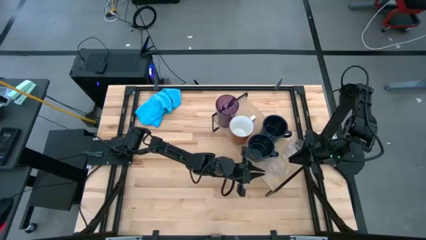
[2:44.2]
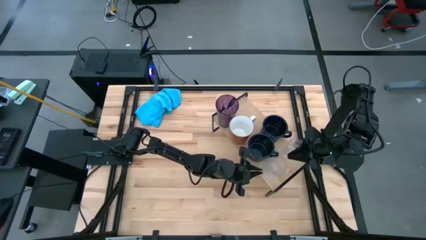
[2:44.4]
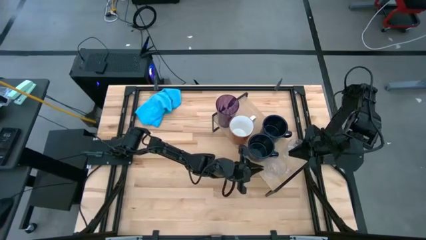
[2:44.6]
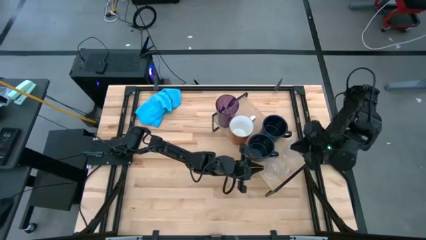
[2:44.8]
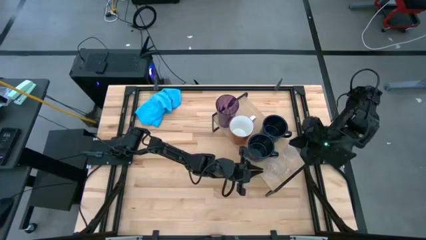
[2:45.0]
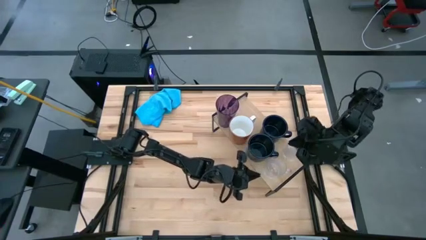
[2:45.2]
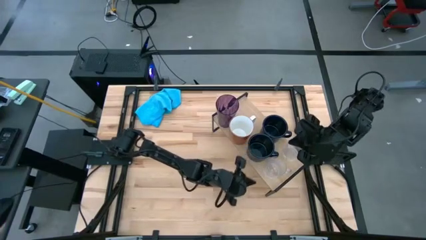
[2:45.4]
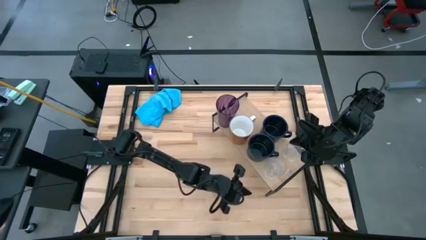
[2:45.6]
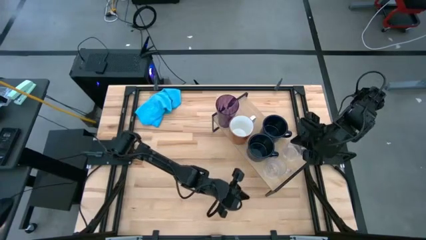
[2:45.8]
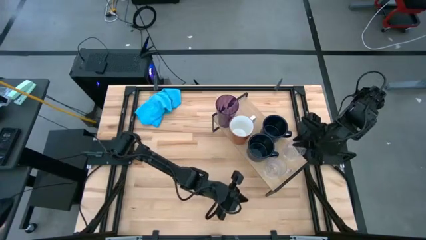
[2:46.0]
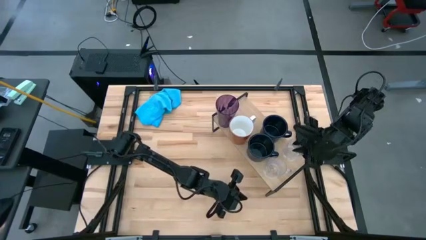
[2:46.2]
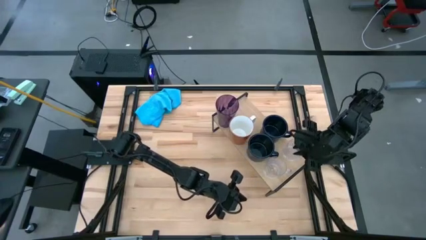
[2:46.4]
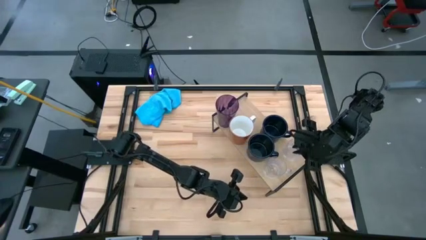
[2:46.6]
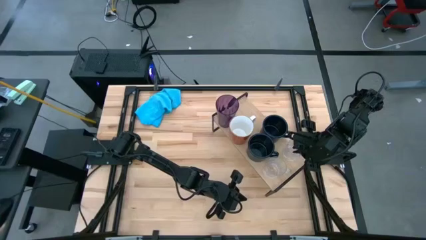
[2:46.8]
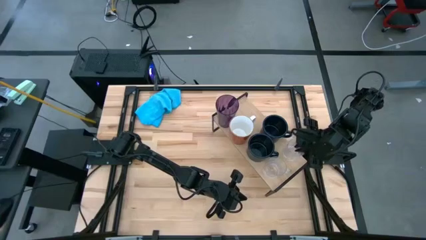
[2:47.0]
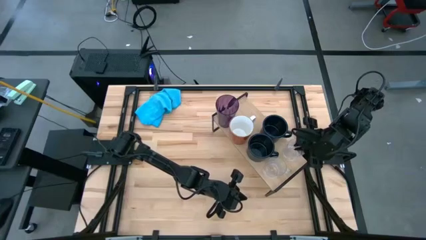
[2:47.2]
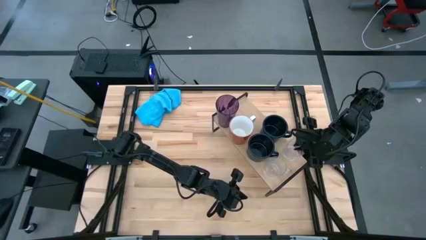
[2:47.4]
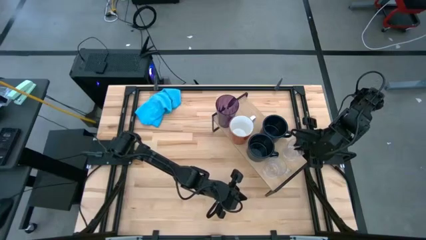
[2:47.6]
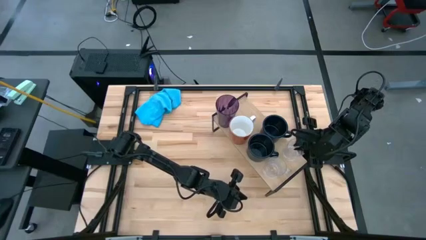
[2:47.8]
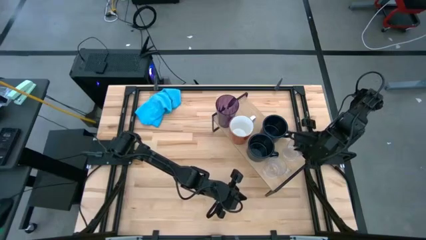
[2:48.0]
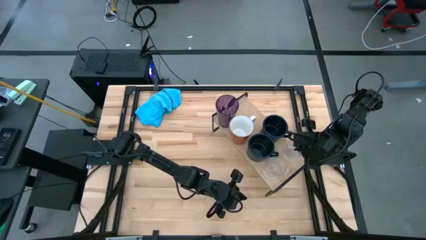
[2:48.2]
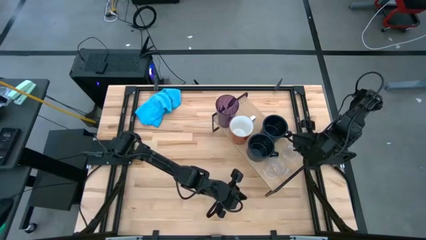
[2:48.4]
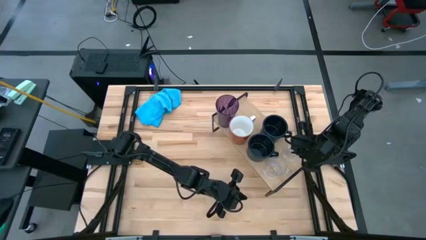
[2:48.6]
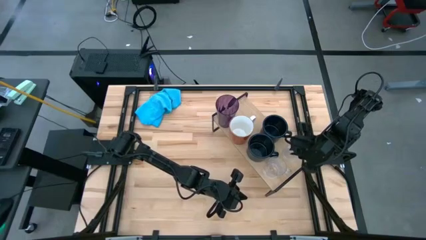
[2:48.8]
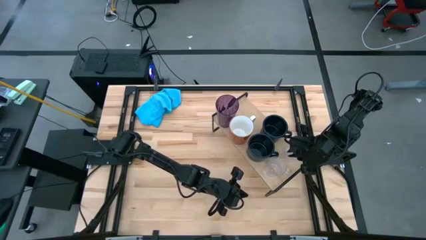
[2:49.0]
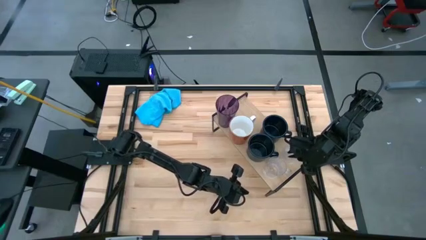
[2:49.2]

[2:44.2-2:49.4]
Task: Stack small to large cups/mugs on shelf
Adjust the transparent mug on the shelf

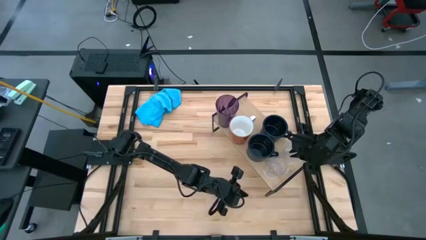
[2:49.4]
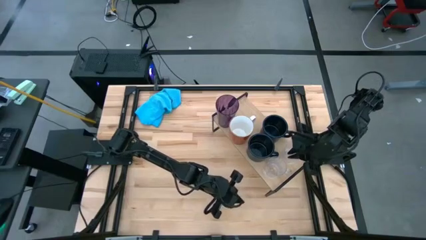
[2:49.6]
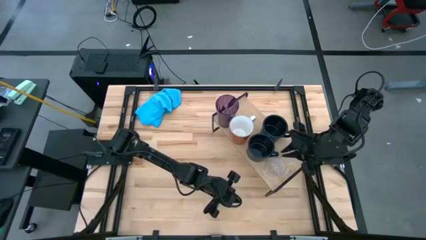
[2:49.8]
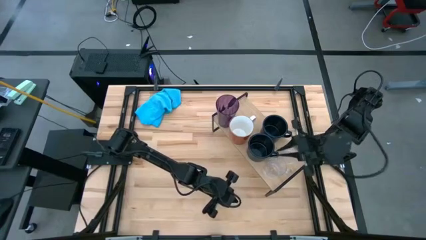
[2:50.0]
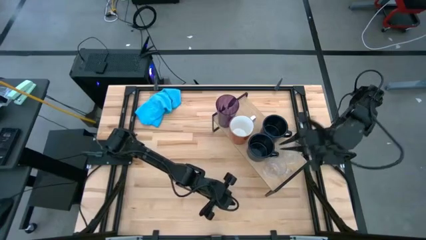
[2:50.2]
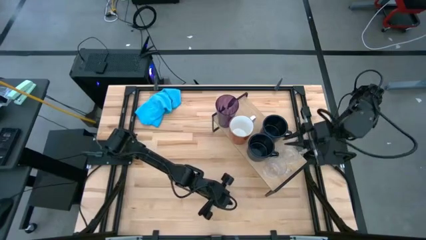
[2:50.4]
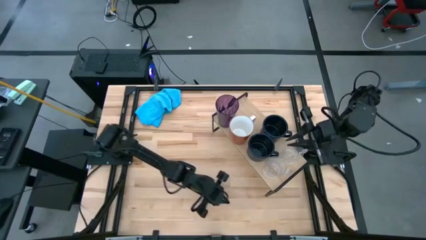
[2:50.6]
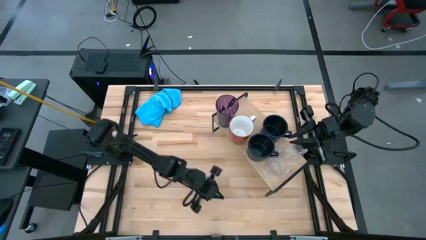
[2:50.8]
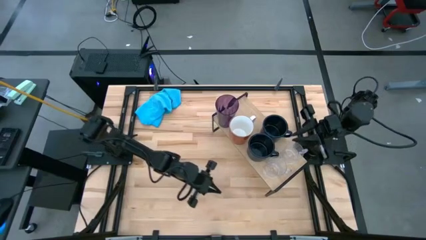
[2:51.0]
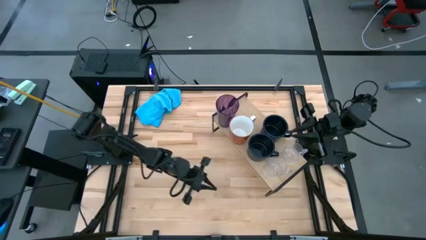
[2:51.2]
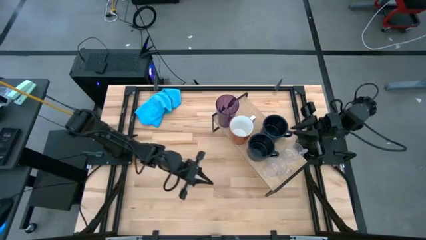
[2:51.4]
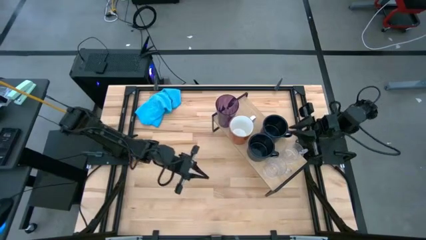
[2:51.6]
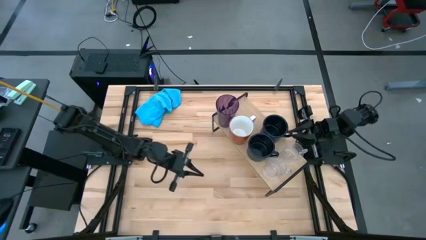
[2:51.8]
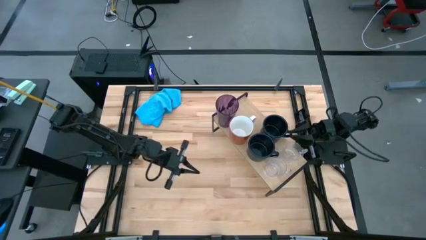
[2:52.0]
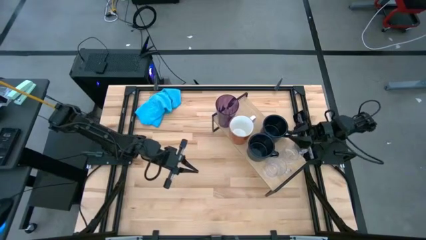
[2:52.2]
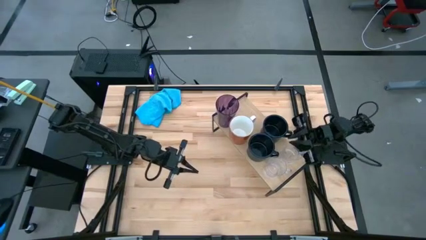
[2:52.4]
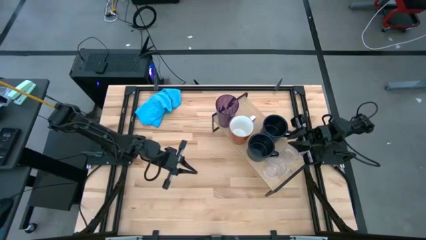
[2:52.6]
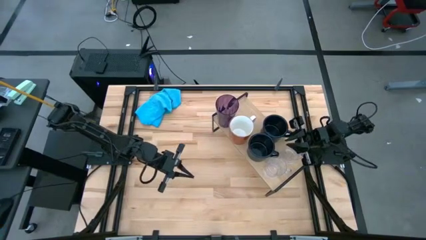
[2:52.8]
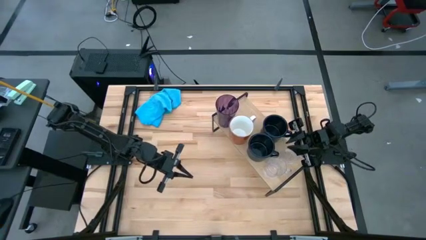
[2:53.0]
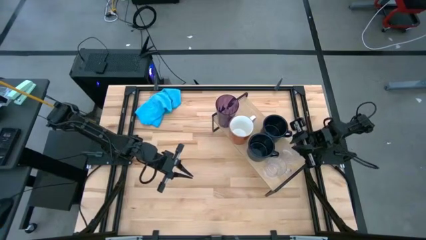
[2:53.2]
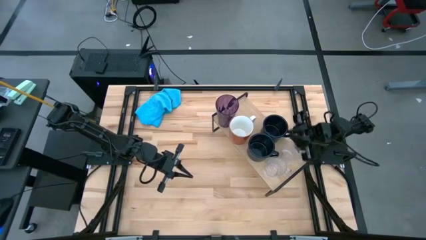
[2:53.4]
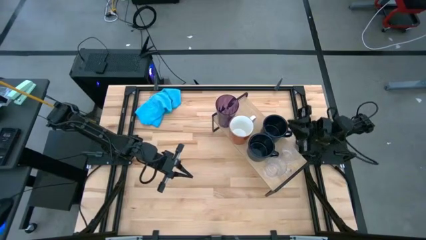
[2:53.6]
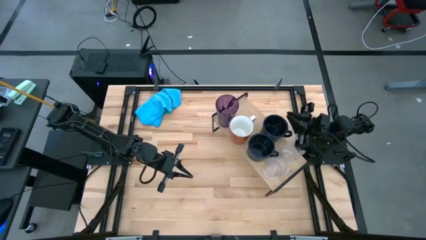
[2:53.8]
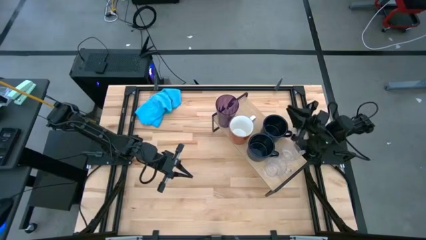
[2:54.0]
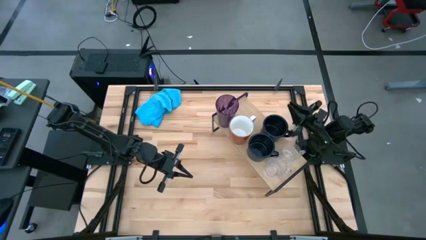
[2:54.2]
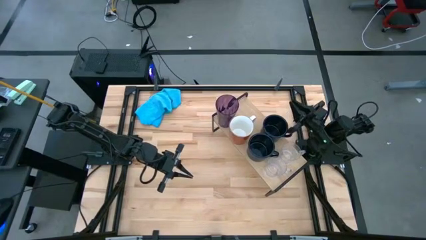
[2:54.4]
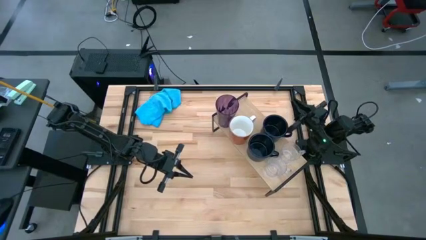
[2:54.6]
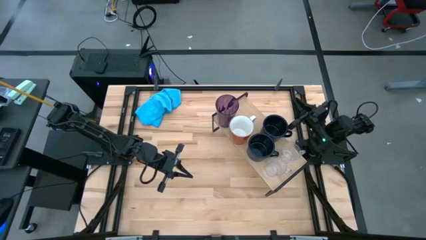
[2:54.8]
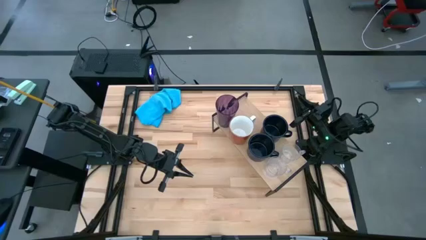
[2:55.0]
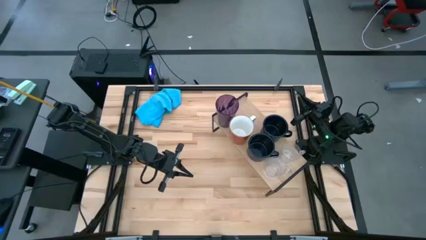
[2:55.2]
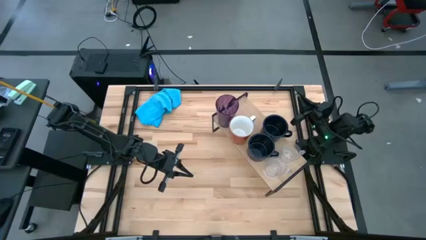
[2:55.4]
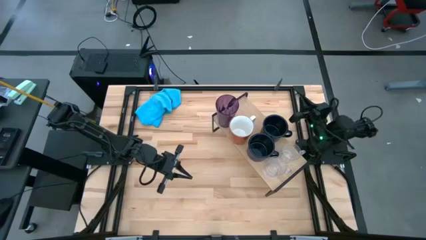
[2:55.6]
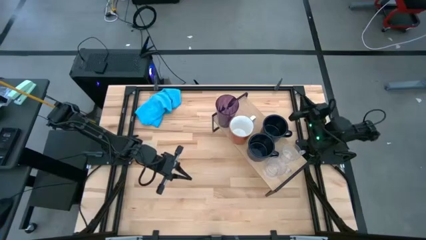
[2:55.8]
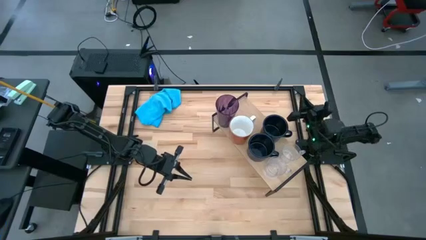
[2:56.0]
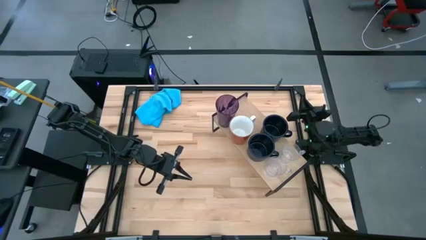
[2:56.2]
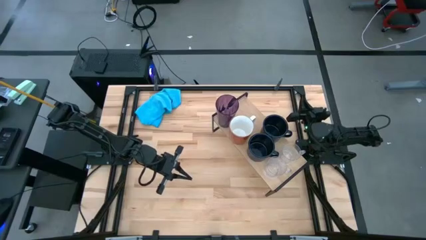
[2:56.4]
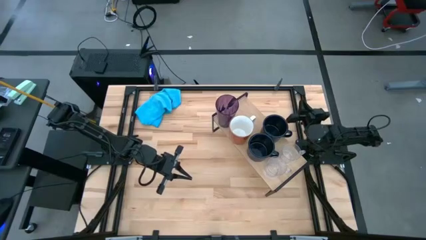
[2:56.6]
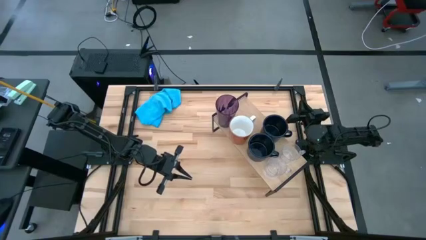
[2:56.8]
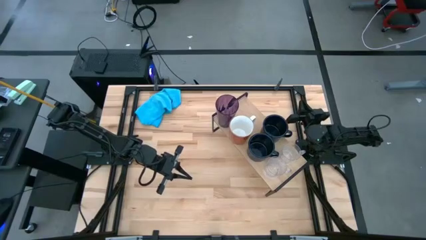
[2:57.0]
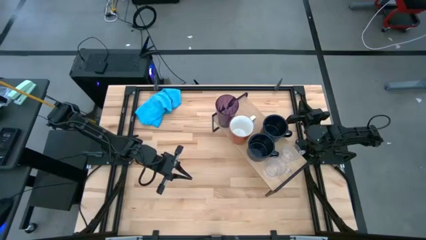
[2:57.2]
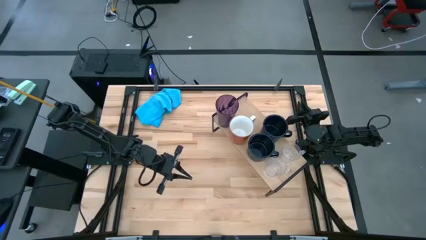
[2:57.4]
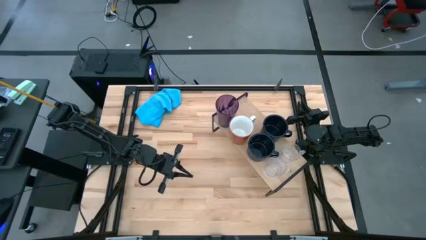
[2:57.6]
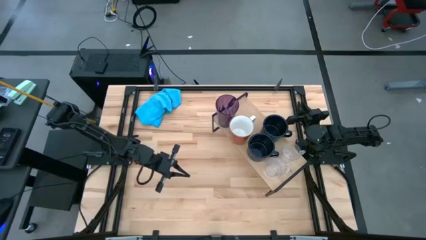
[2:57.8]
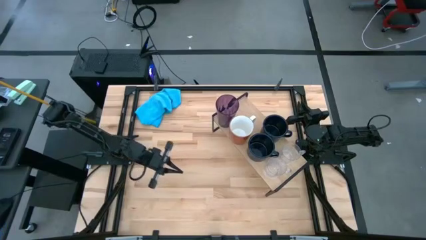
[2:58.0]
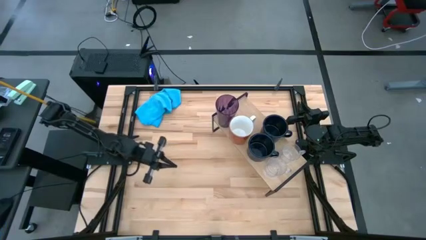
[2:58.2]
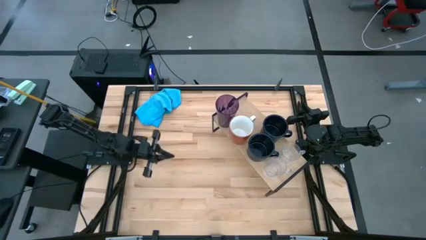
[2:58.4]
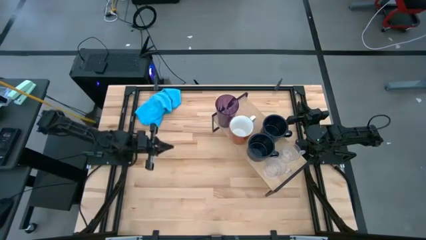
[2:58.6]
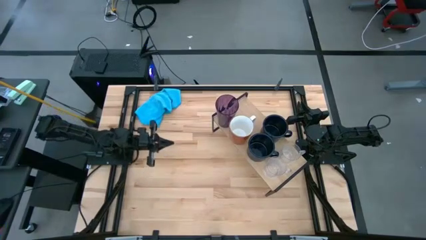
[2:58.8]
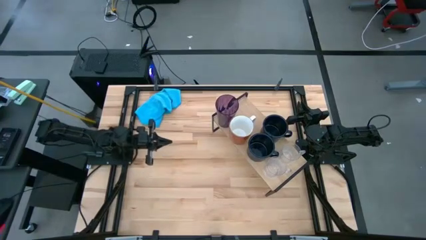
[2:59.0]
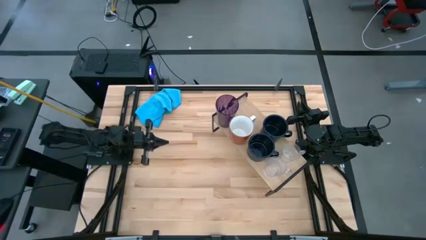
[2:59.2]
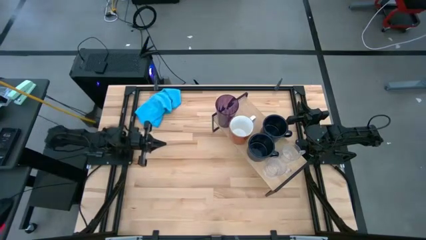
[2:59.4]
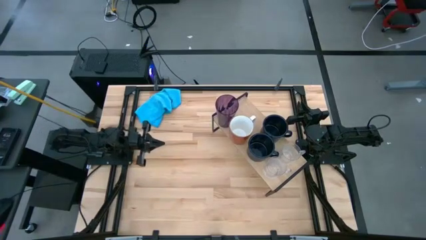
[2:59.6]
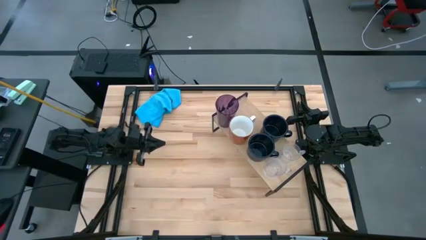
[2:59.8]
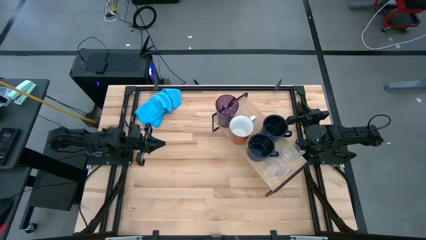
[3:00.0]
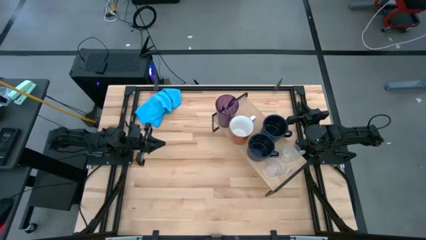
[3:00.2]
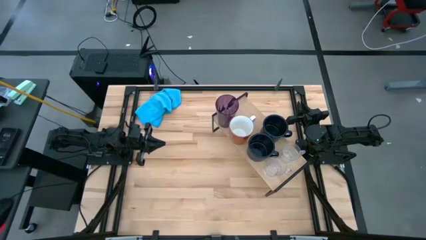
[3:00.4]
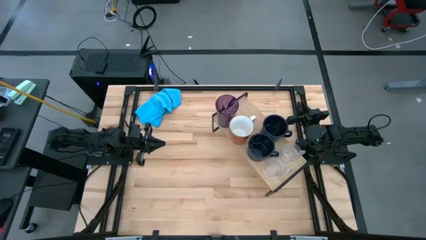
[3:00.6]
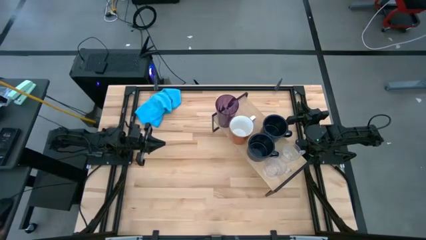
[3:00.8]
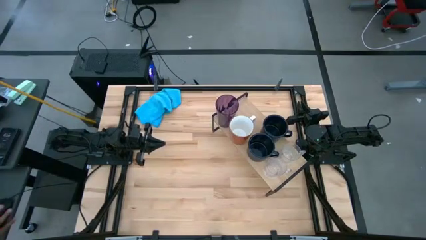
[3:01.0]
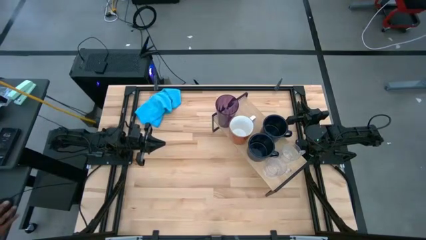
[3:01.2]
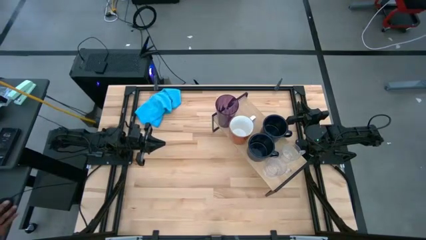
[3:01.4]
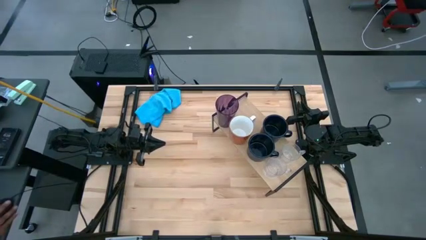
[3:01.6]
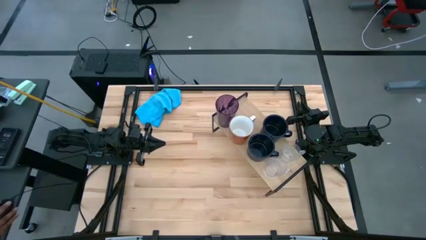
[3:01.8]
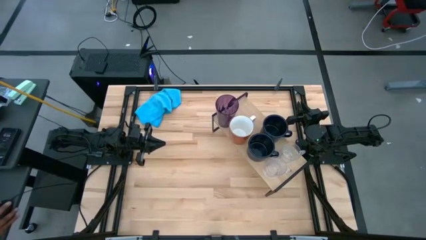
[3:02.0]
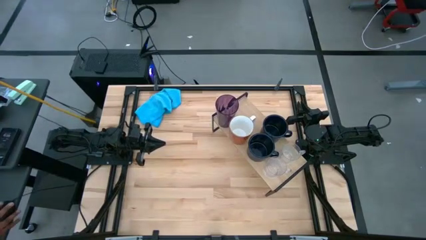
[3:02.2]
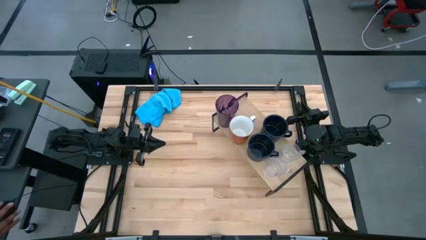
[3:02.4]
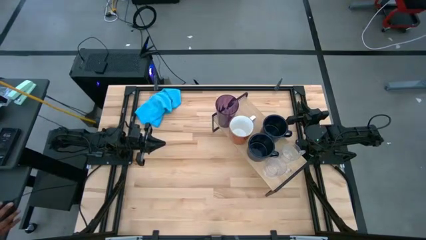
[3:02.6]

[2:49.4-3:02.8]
Return to Home Position
